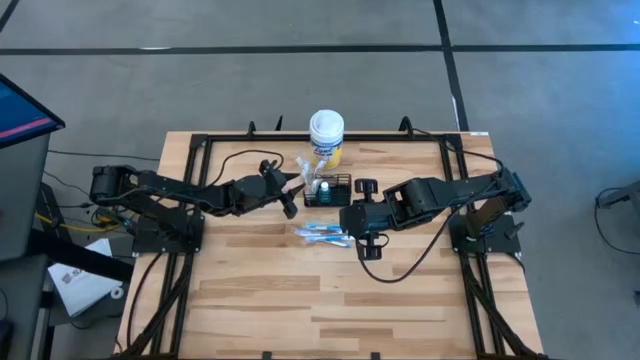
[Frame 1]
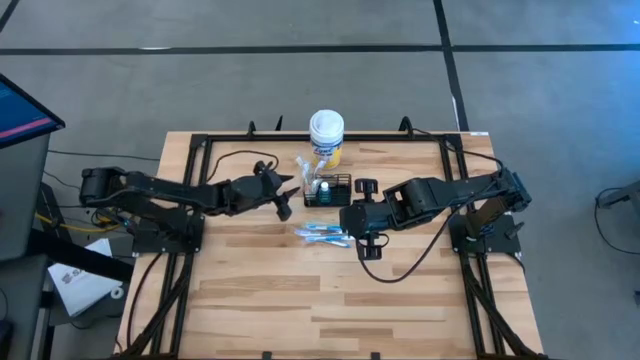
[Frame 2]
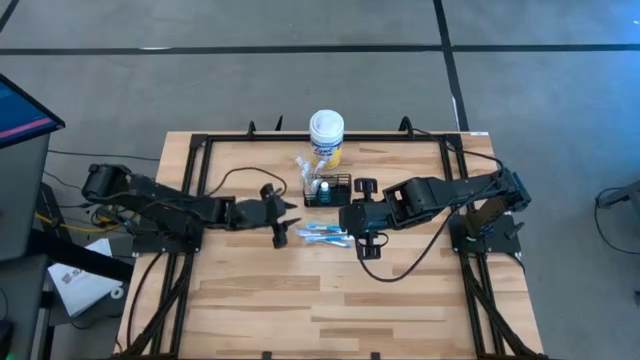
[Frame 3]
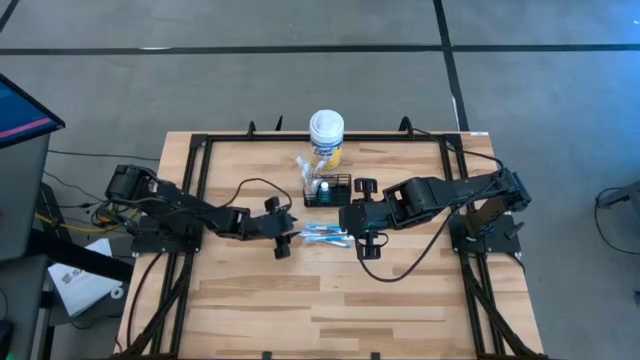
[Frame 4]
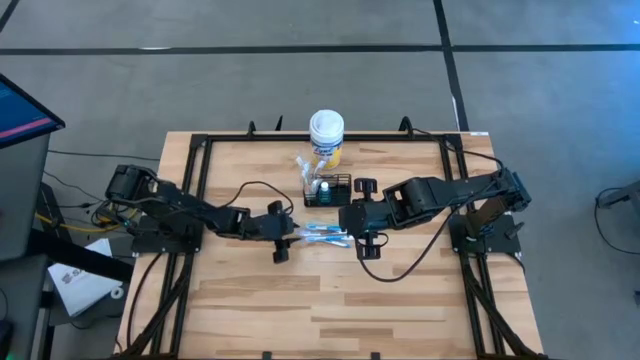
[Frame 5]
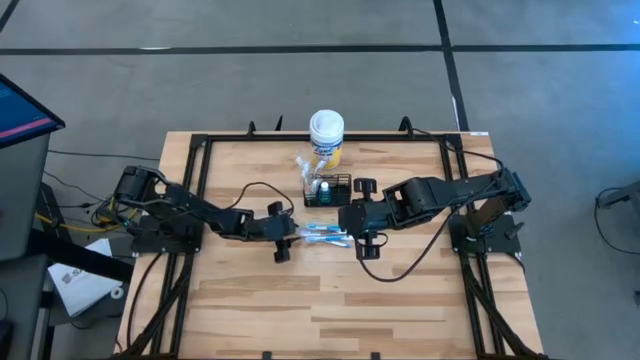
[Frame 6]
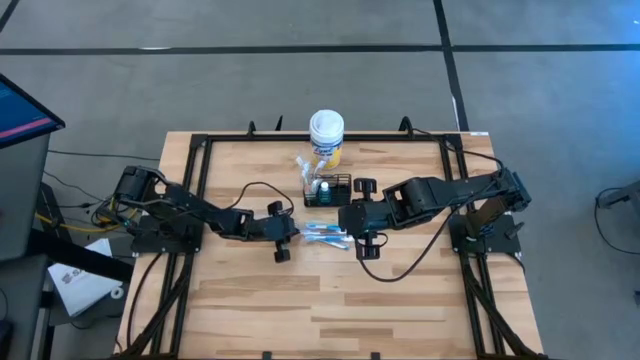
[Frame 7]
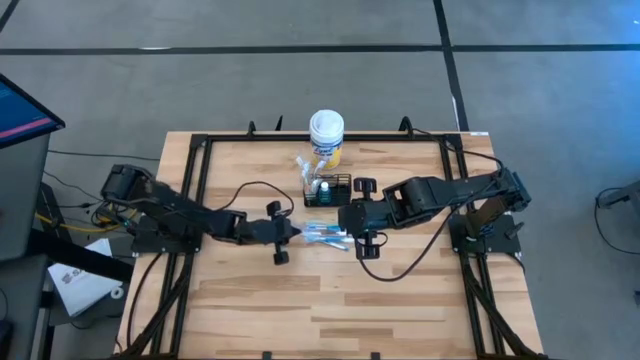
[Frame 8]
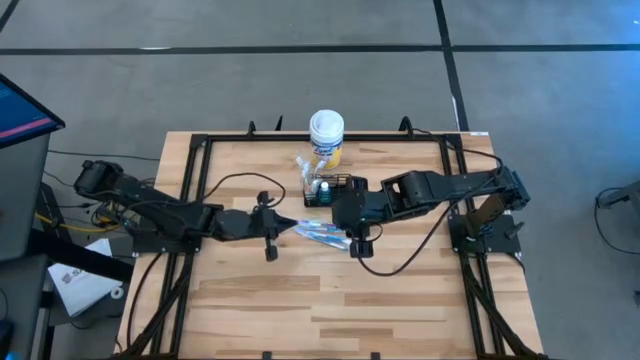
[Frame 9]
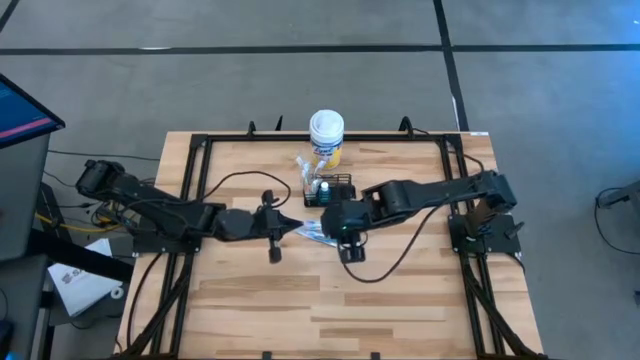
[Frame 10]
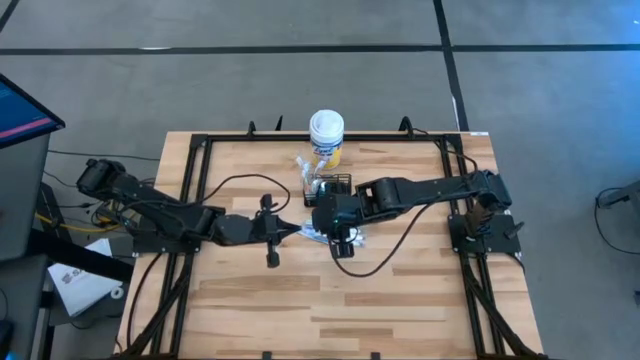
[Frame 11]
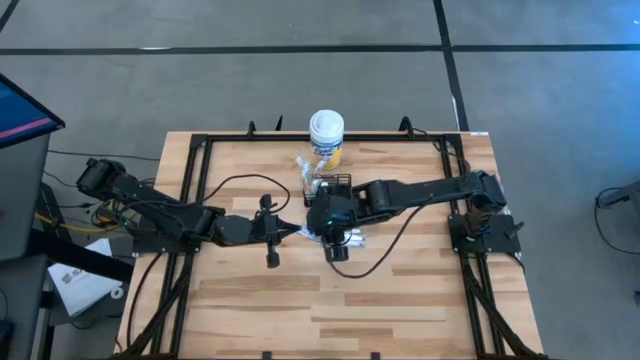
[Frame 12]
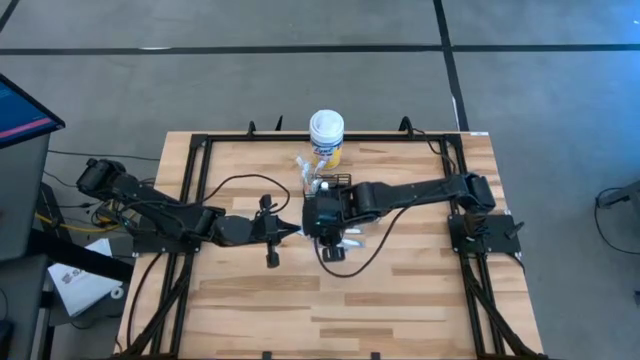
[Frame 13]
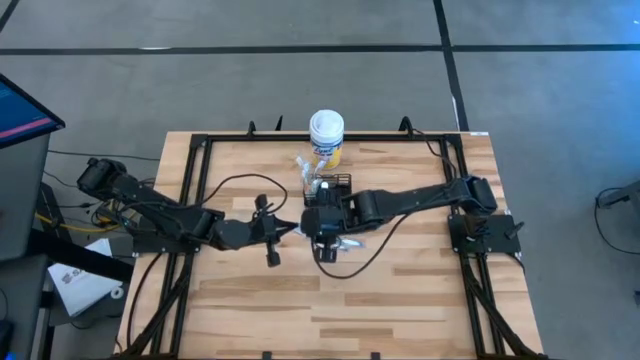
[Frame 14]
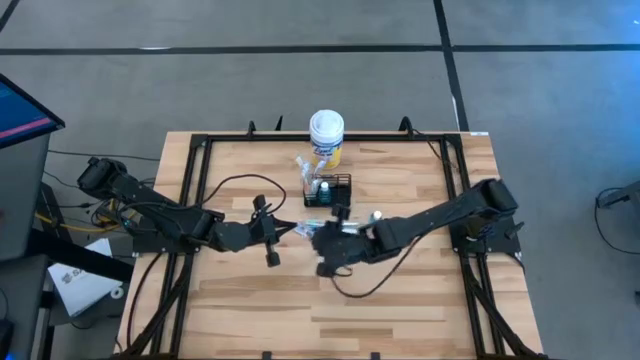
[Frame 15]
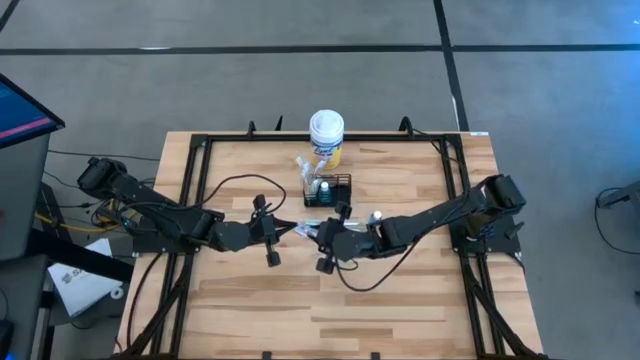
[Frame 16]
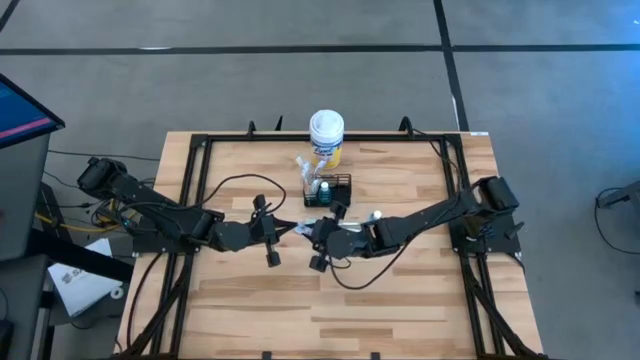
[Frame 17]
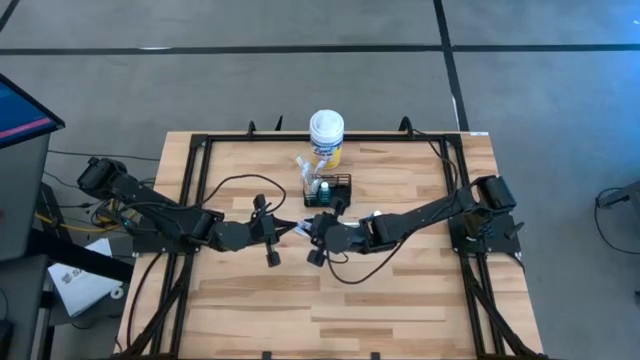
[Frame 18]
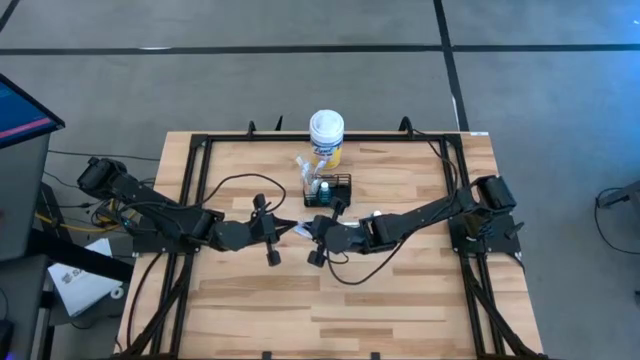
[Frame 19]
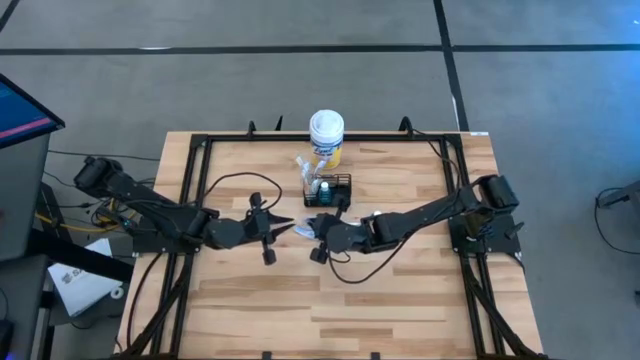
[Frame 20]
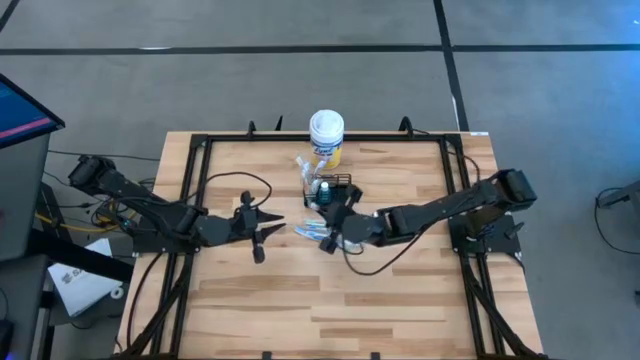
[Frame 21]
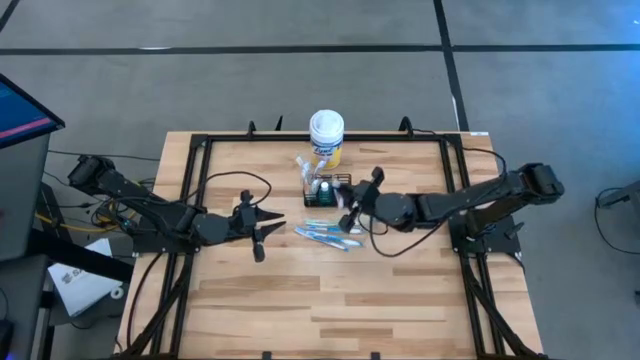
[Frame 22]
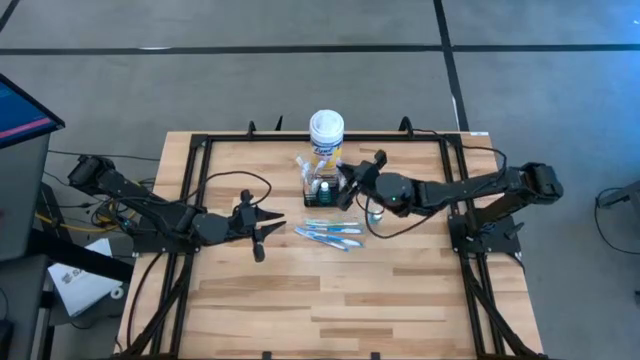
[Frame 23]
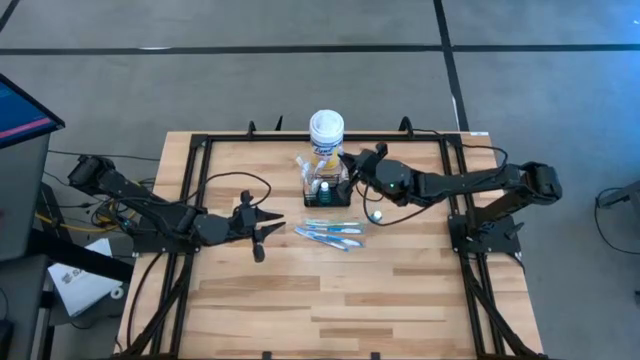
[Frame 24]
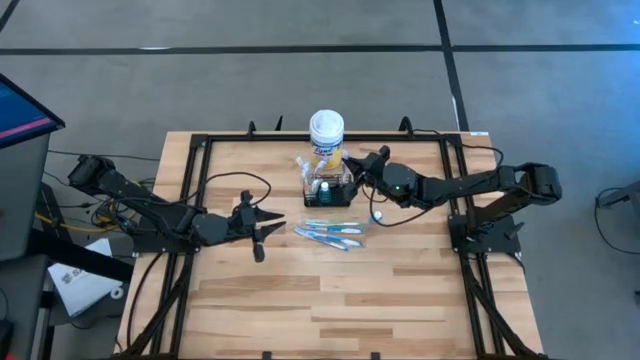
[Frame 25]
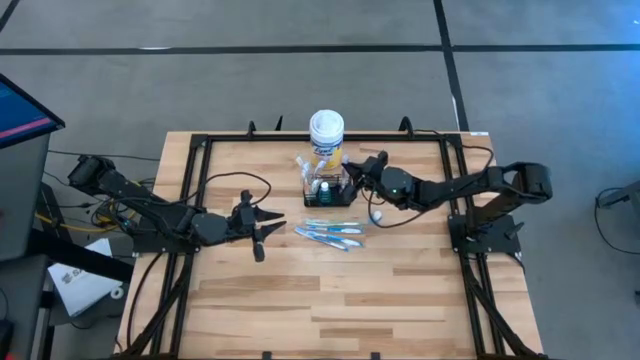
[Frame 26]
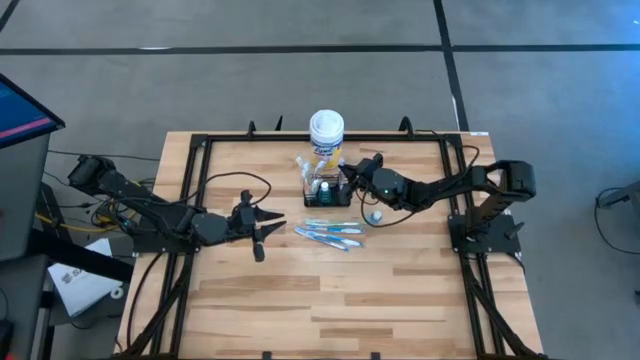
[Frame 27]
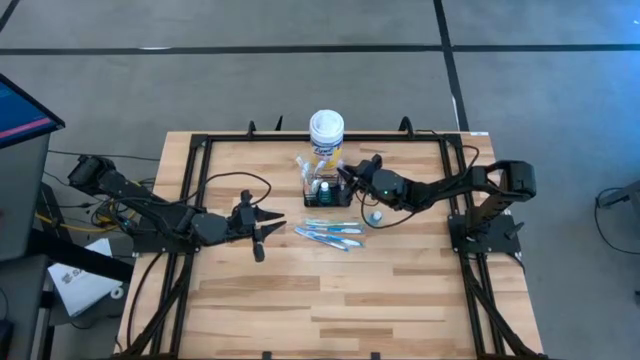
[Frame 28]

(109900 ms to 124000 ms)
Task: Pick & Place toothbrushing station
Put the violet toothbrush into the black wire organizer

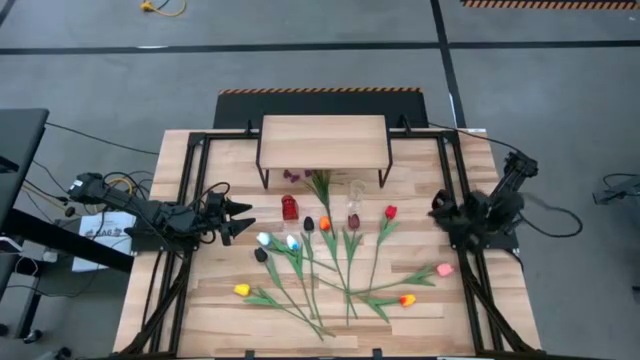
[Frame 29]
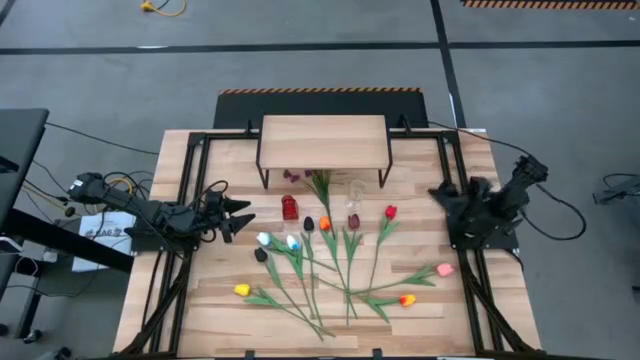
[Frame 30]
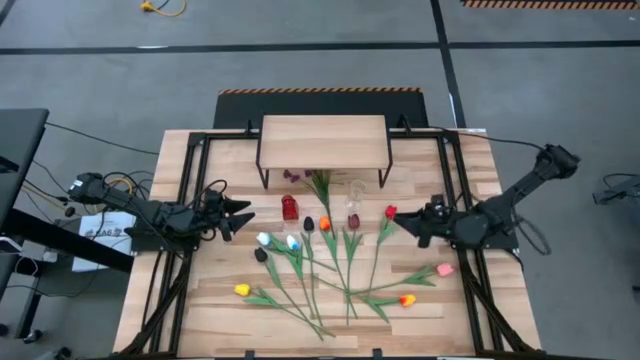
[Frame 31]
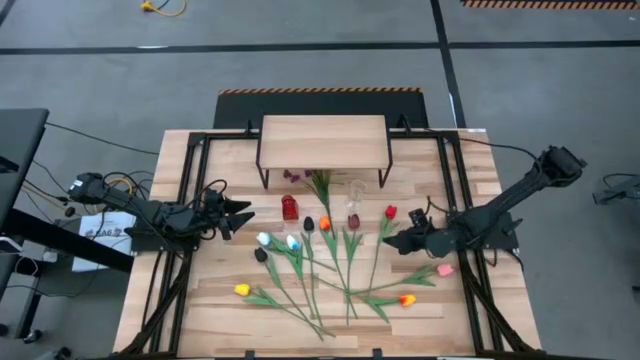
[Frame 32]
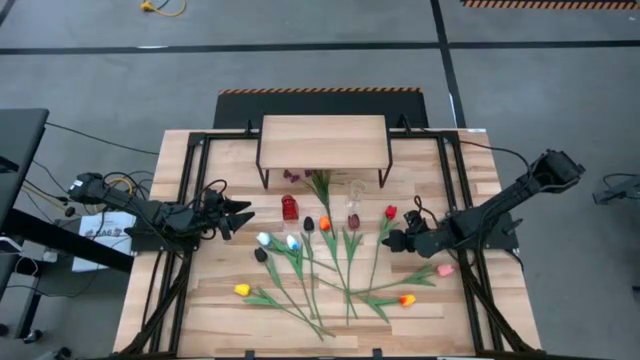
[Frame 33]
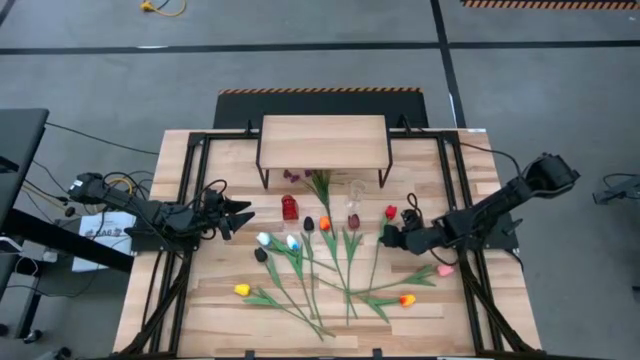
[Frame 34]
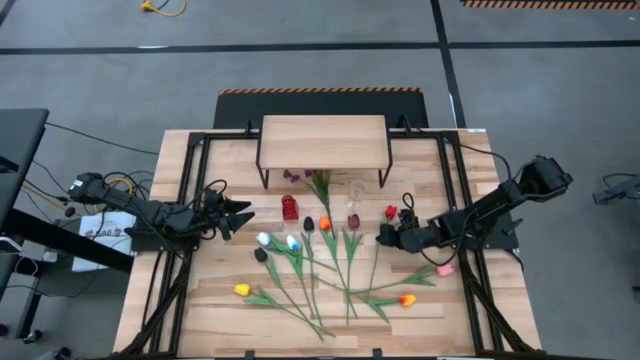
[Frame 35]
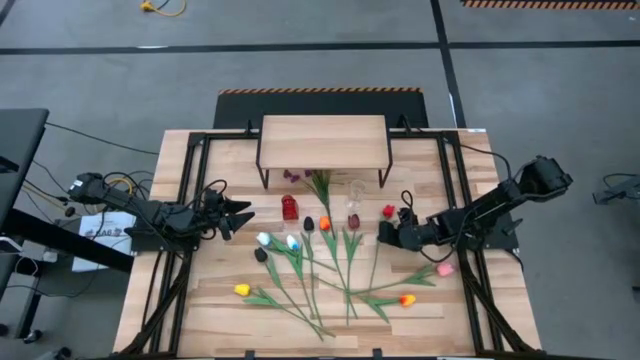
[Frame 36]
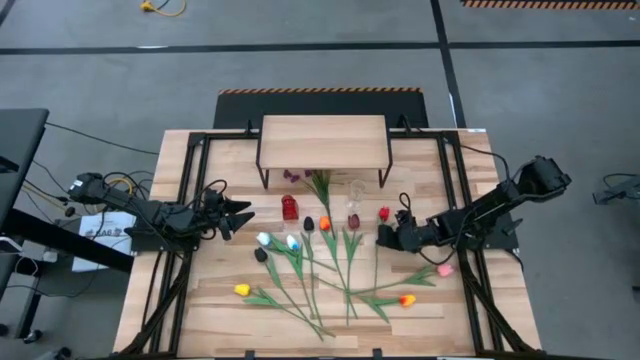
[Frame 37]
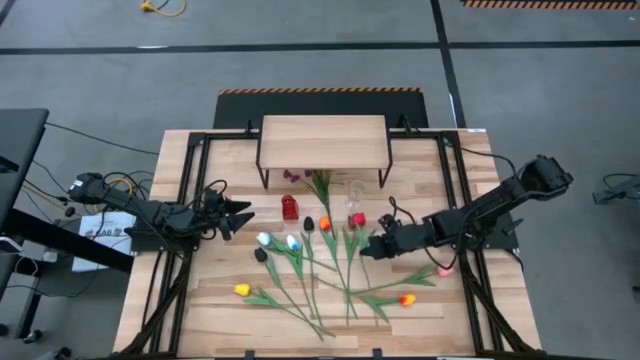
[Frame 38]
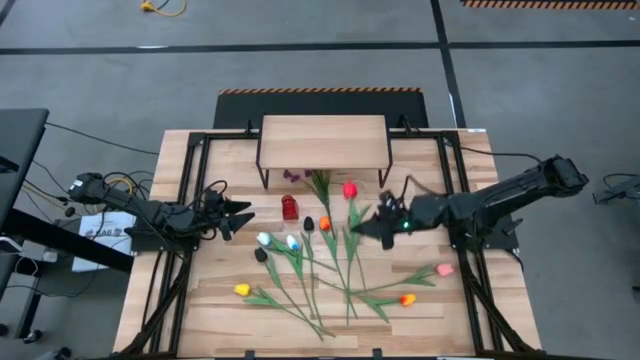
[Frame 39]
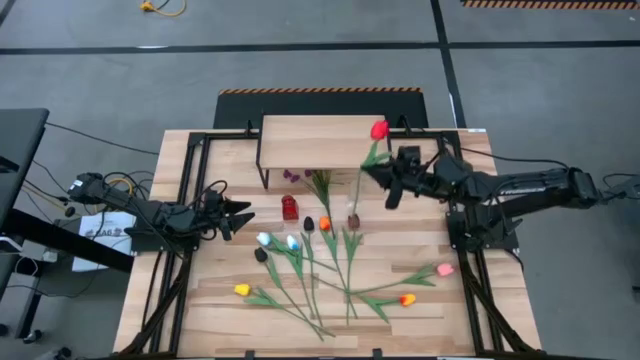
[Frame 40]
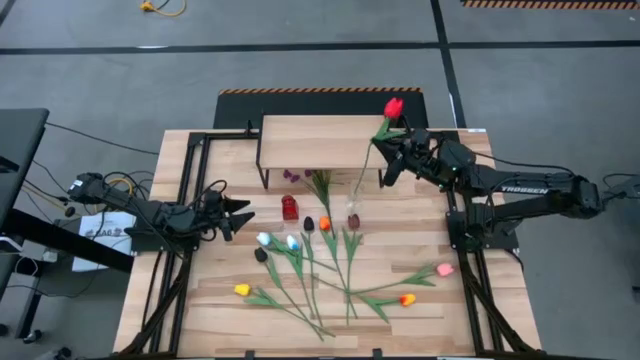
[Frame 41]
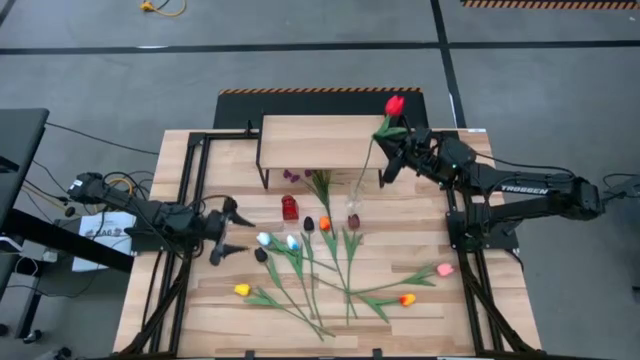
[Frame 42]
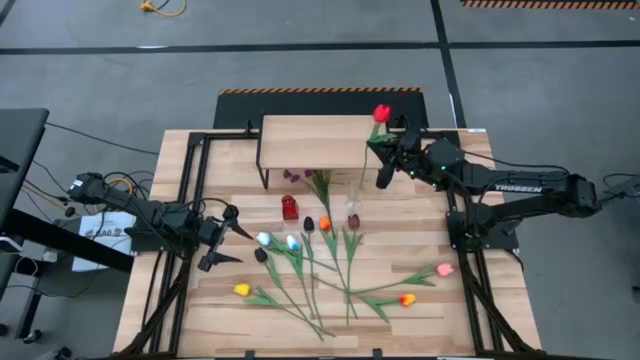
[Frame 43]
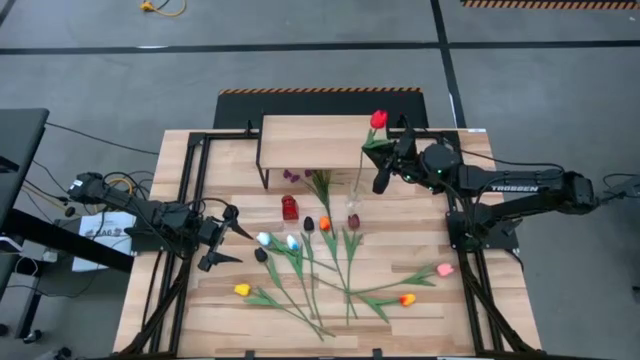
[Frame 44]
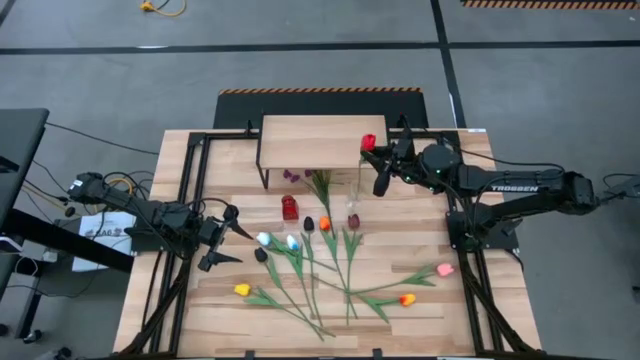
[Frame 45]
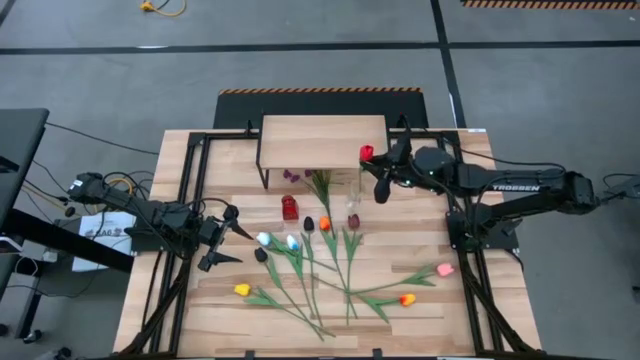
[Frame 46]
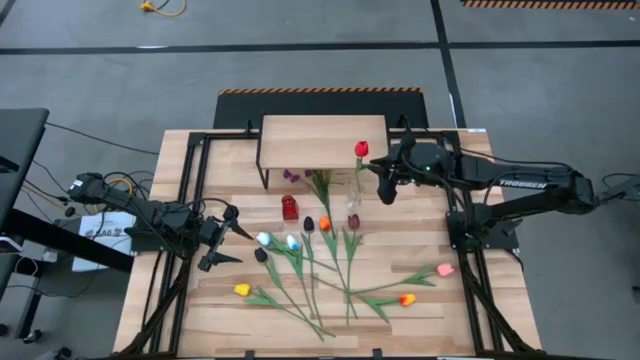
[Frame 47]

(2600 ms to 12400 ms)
Task: Pick and place flowers into a vace then onto a shelf
Put the red tulip into the transparent vase
